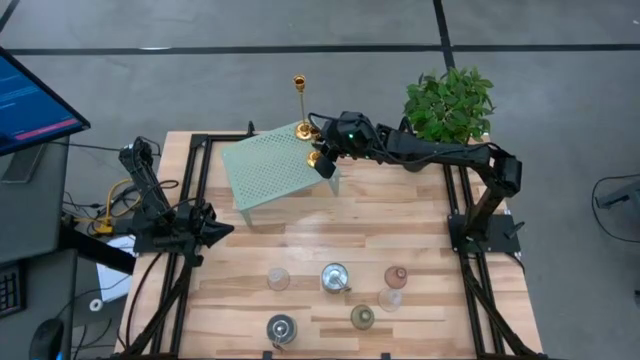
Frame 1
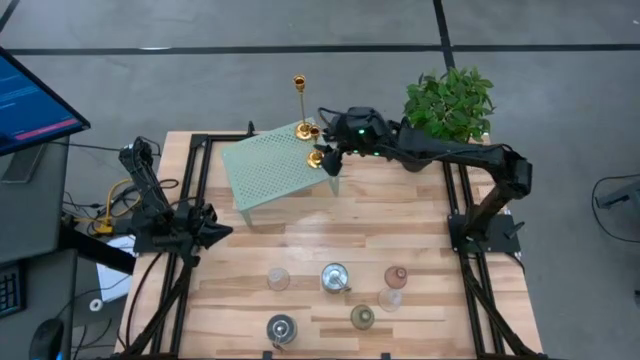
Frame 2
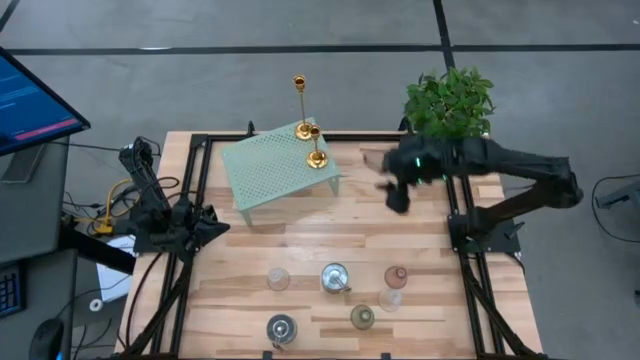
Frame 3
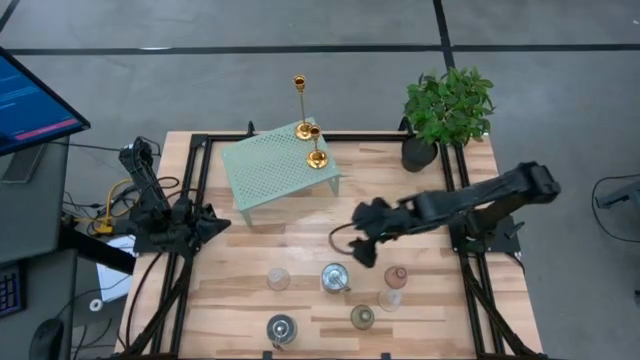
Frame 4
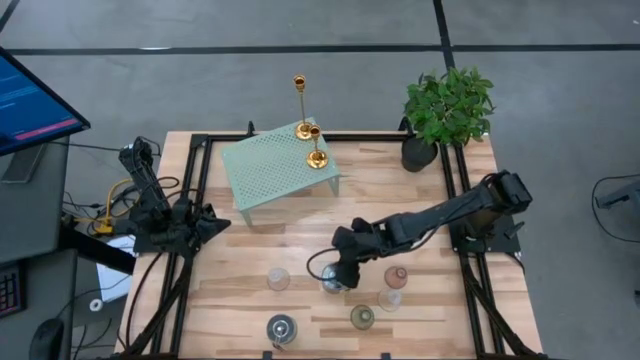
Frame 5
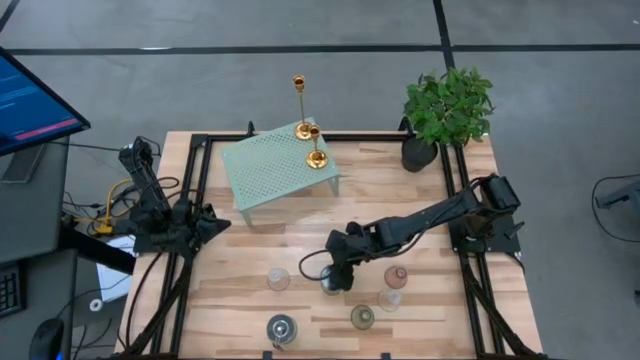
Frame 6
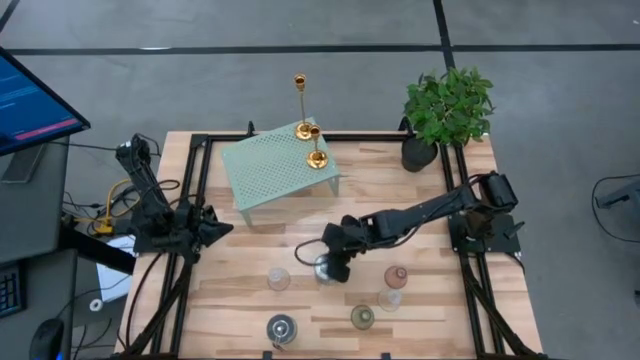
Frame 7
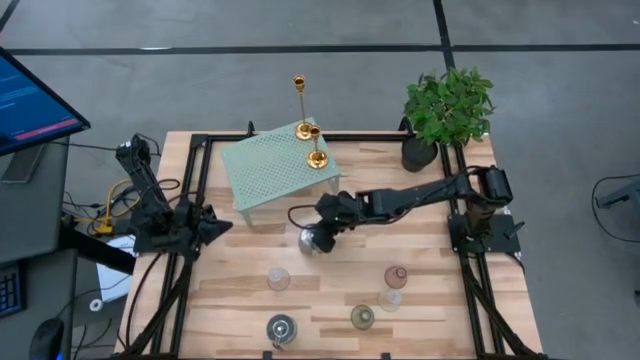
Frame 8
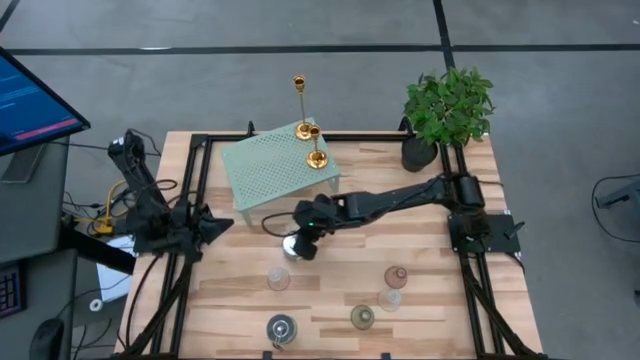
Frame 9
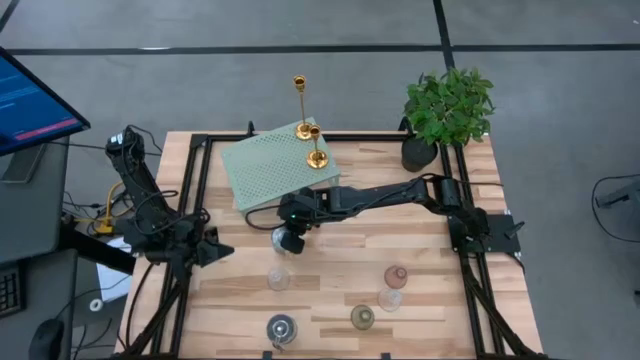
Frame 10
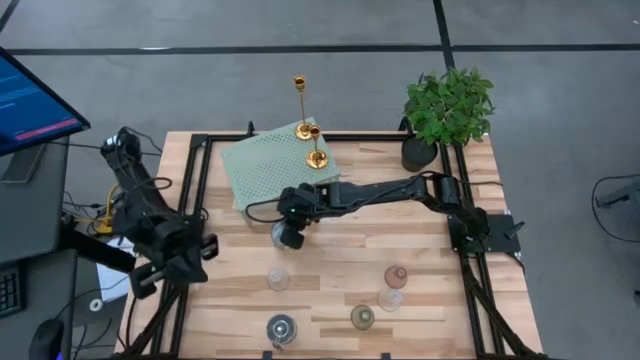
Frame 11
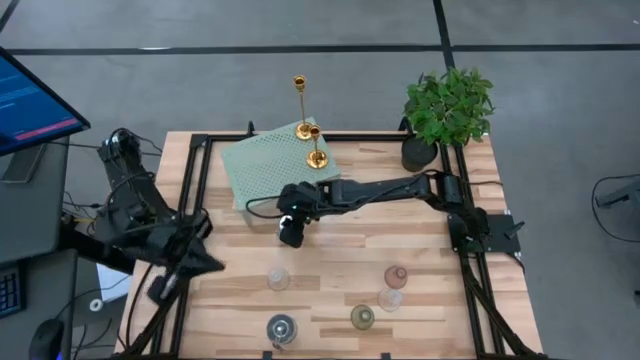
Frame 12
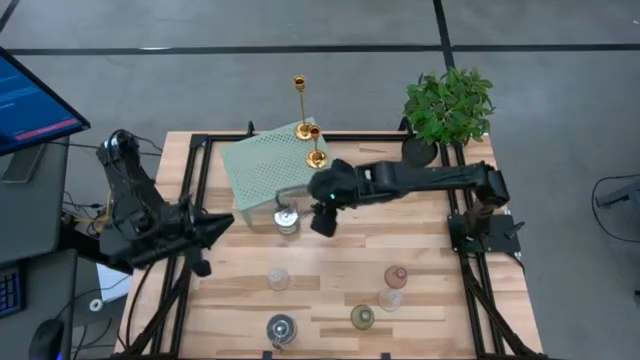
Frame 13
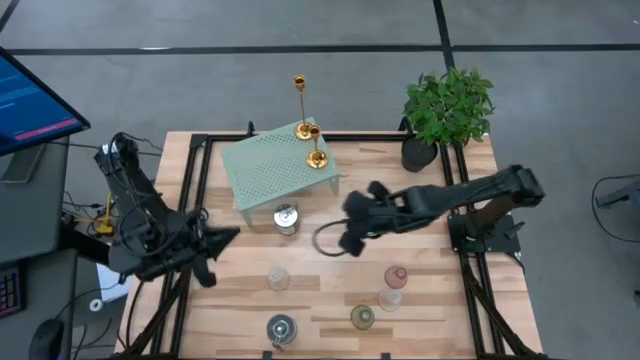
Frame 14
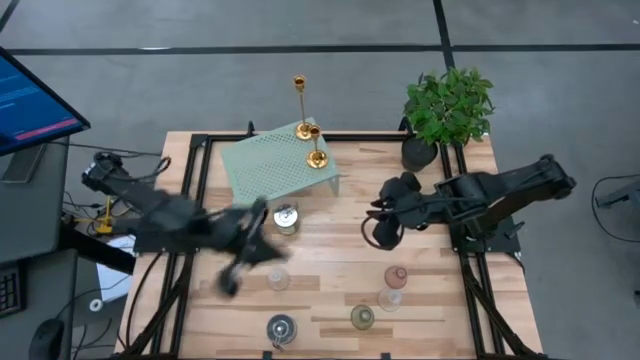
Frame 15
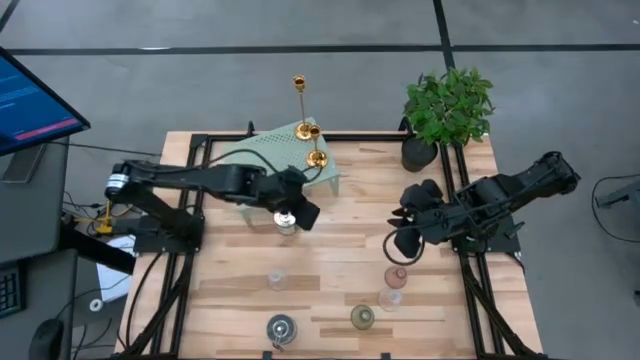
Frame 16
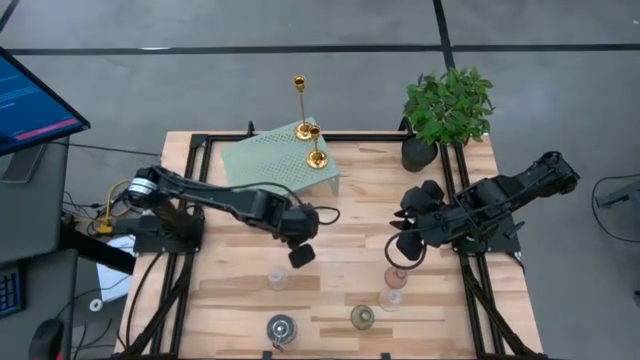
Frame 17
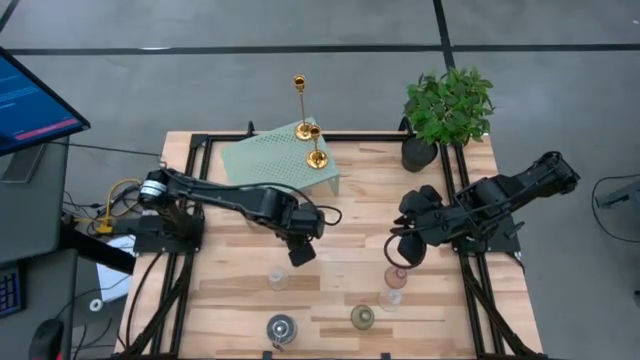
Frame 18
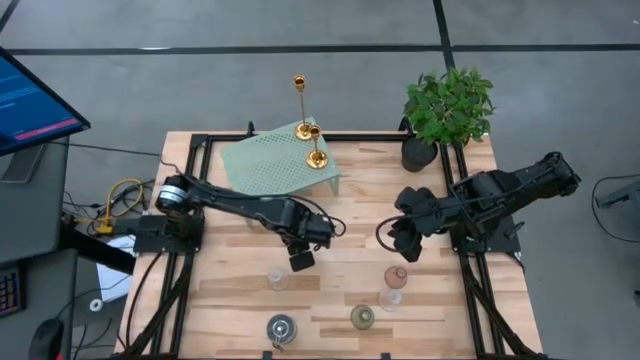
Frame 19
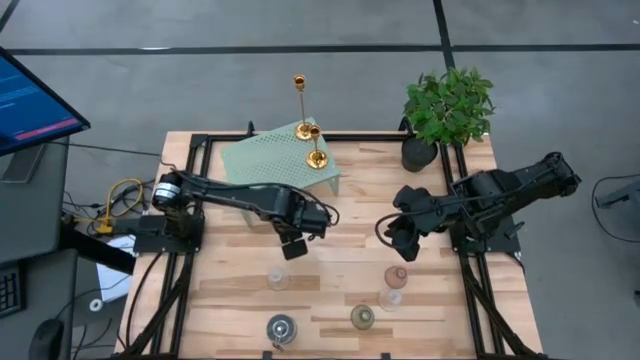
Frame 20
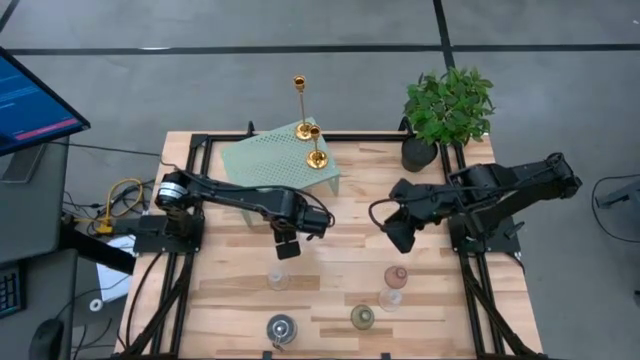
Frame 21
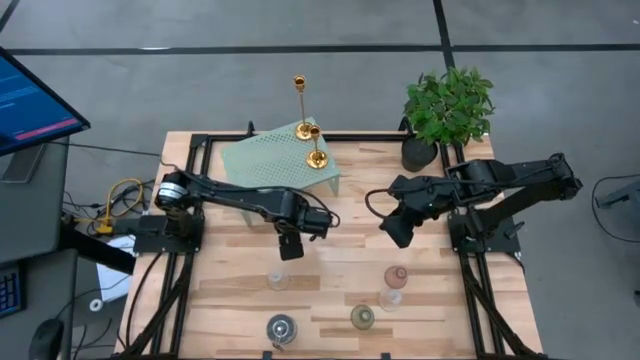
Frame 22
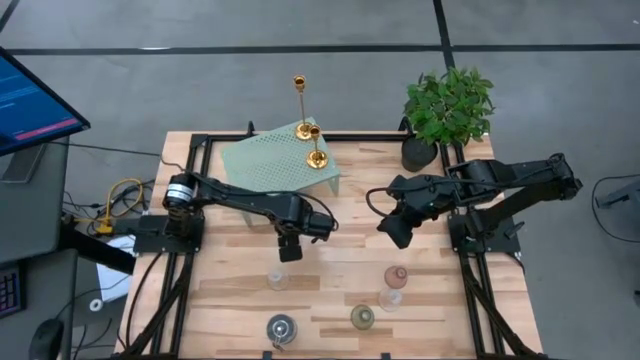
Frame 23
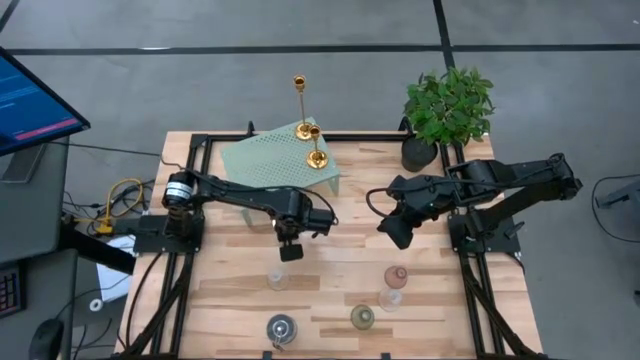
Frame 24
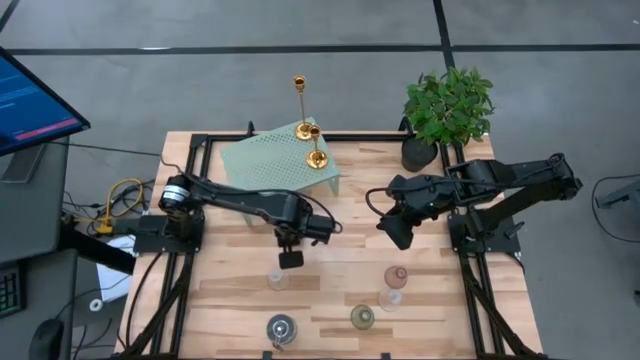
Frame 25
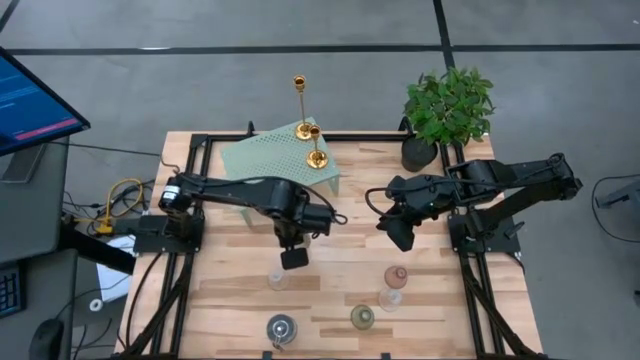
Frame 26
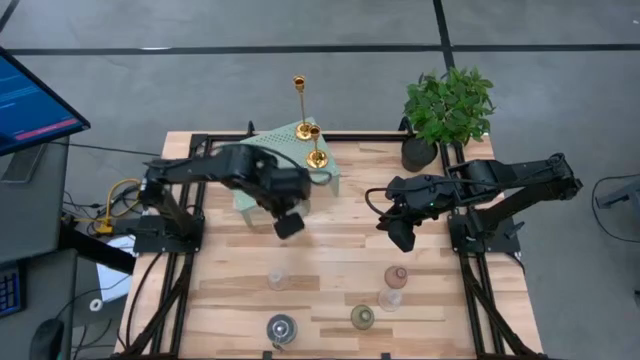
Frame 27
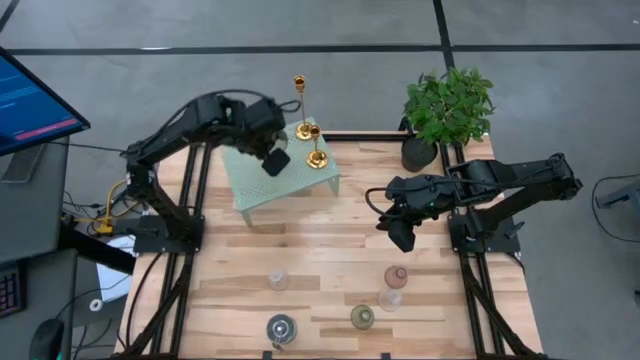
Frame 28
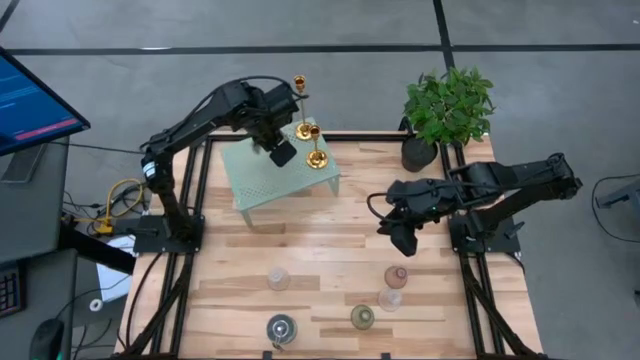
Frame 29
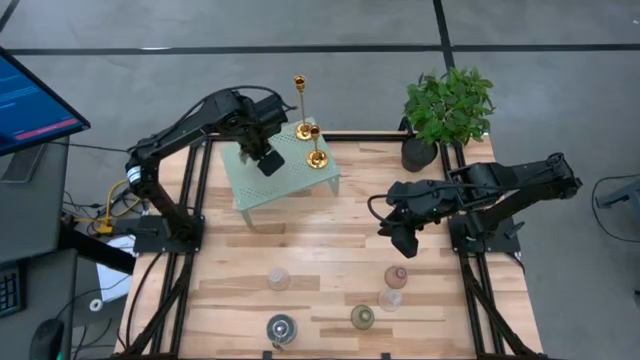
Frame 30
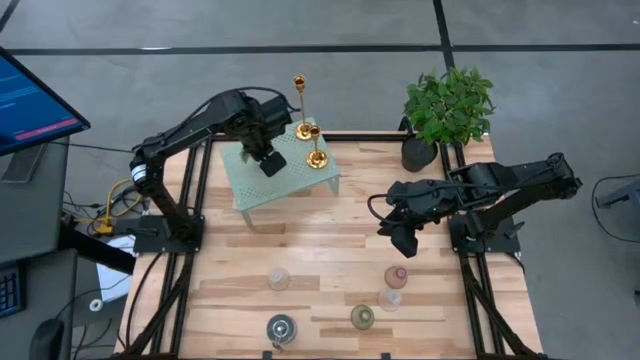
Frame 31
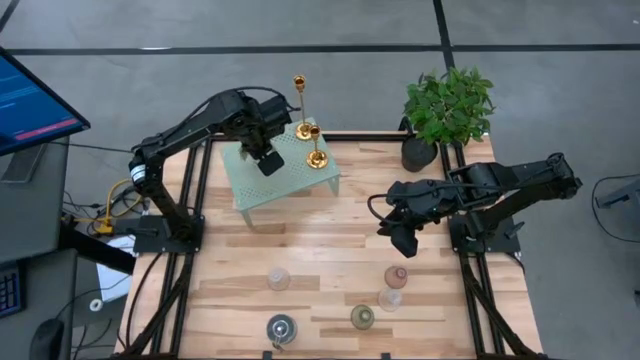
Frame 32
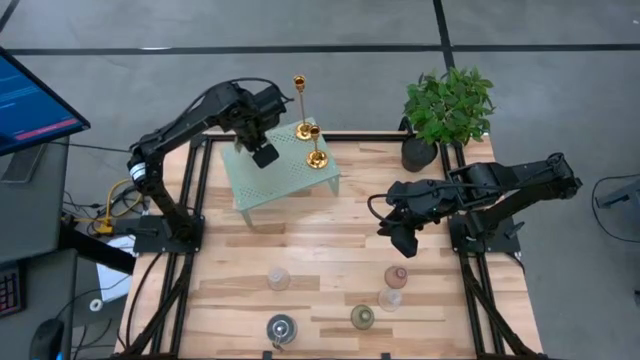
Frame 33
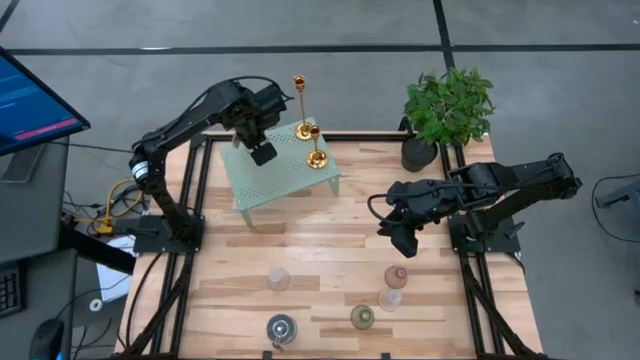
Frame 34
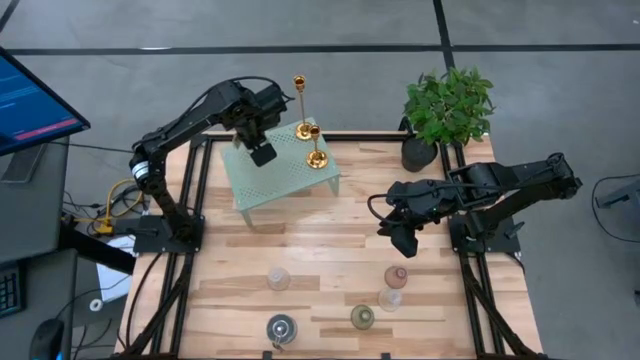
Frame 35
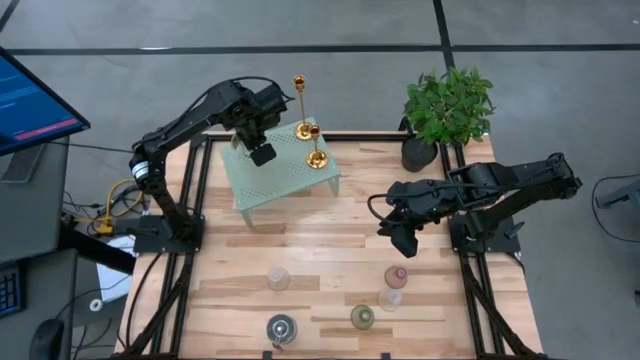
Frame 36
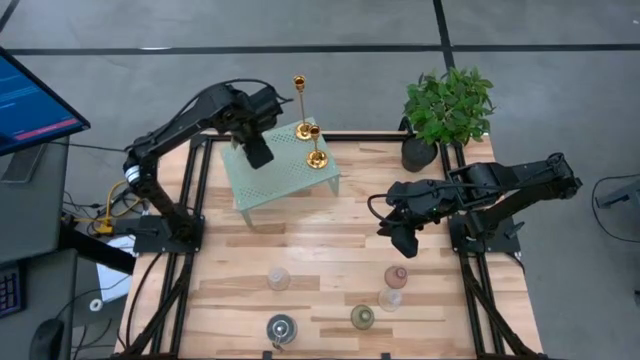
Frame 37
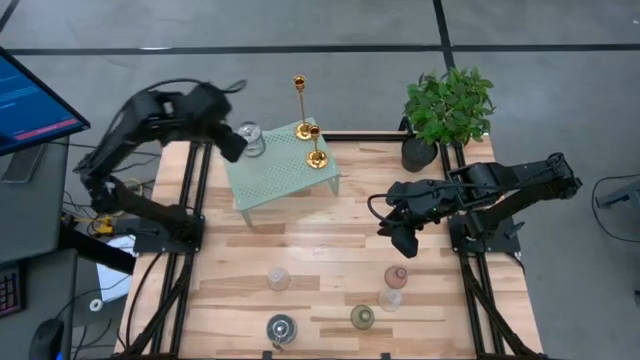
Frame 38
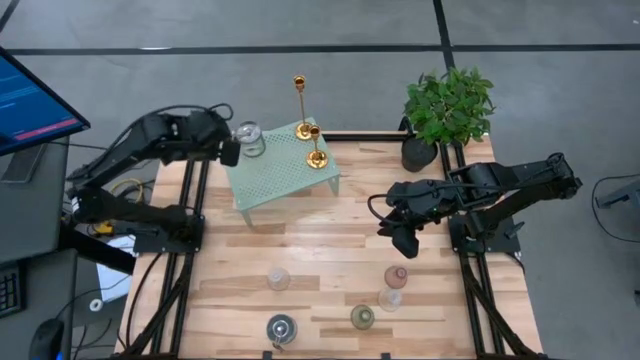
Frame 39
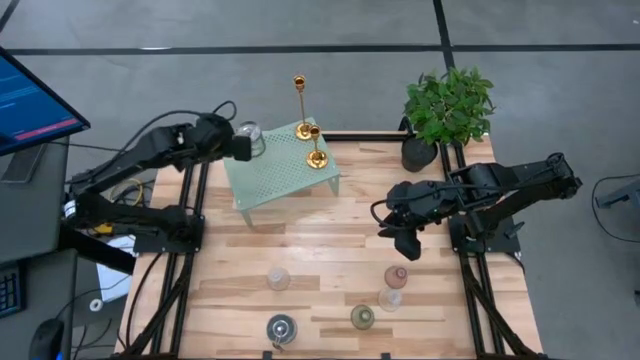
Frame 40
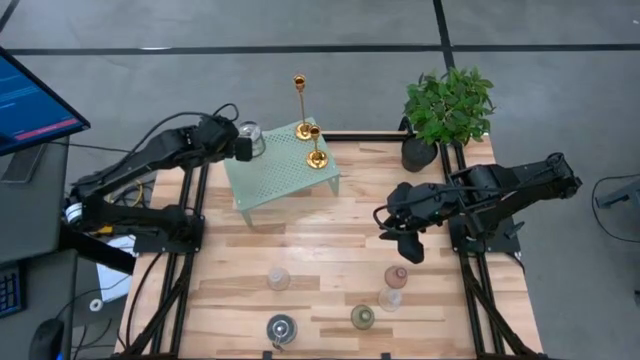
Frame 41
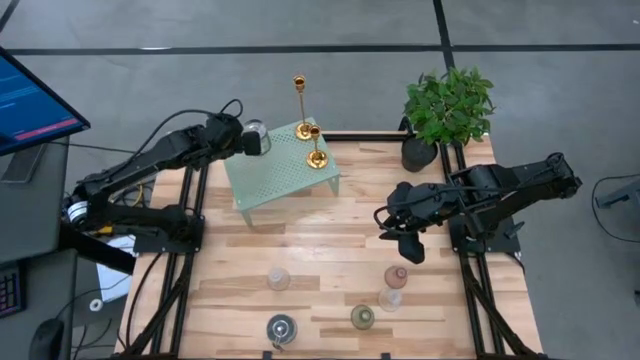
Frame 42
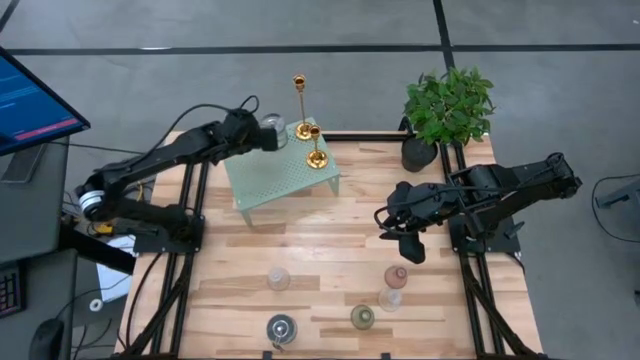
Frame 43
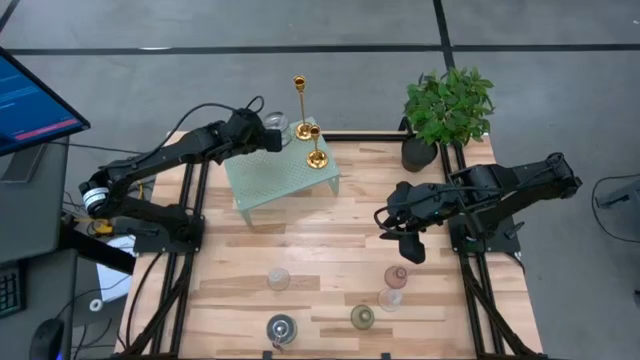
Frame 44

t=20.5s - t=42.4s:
Task: Pick & Place candle stick holders
Put the green scented candle on the shelf
